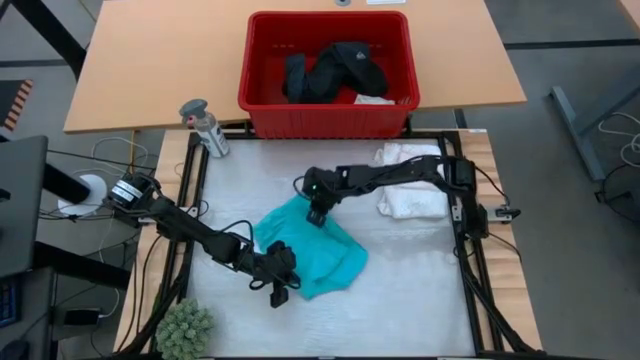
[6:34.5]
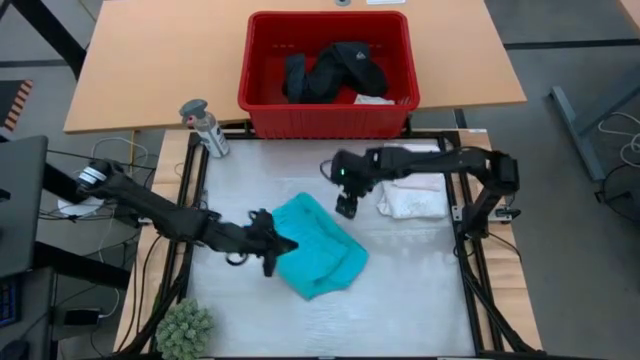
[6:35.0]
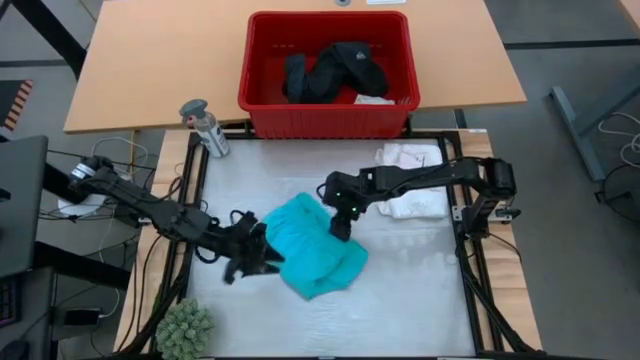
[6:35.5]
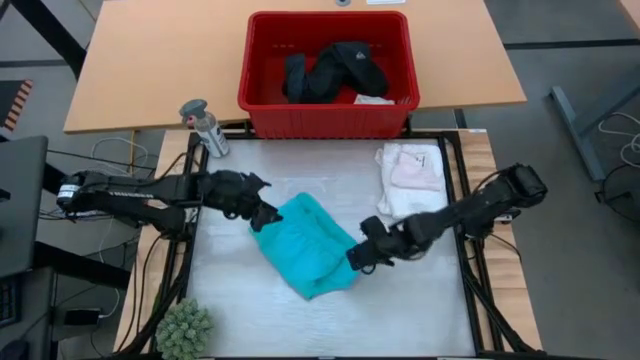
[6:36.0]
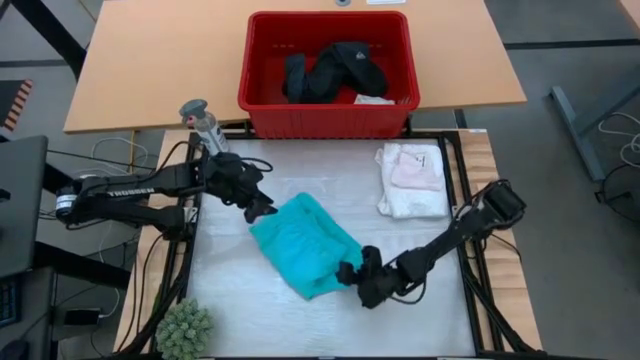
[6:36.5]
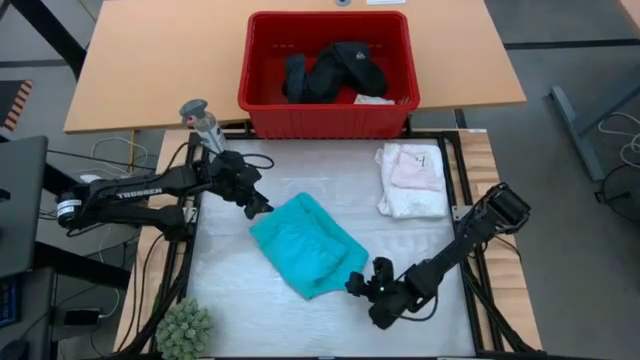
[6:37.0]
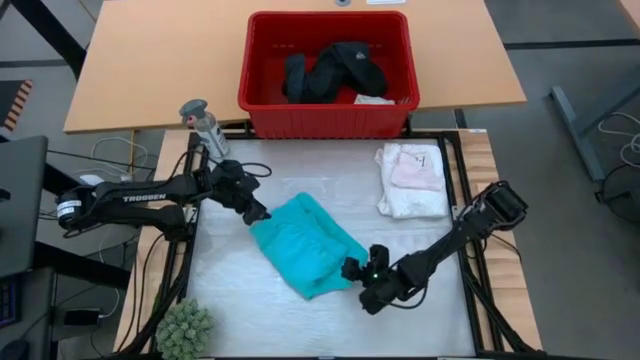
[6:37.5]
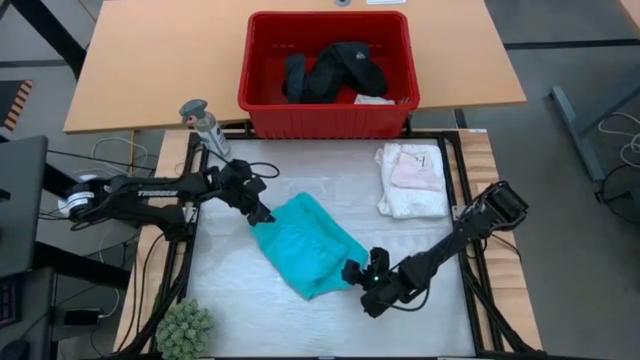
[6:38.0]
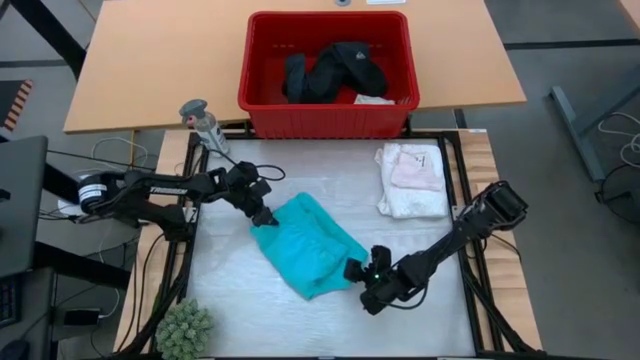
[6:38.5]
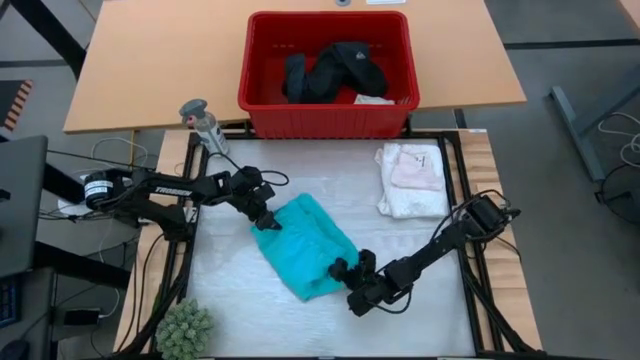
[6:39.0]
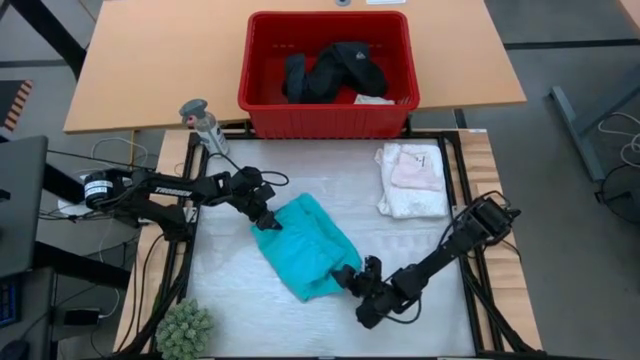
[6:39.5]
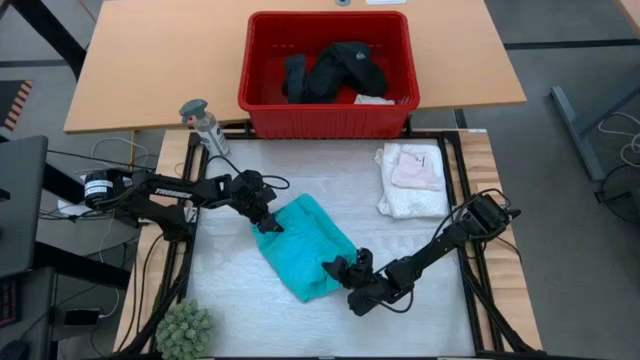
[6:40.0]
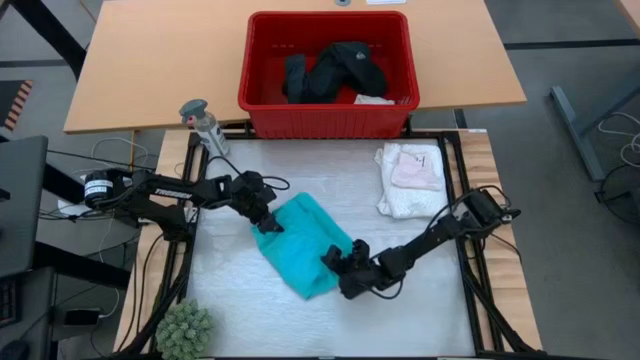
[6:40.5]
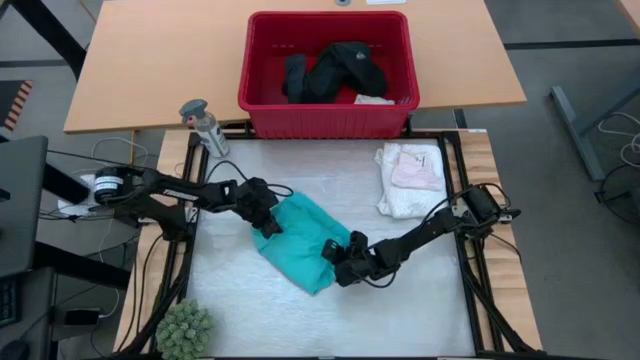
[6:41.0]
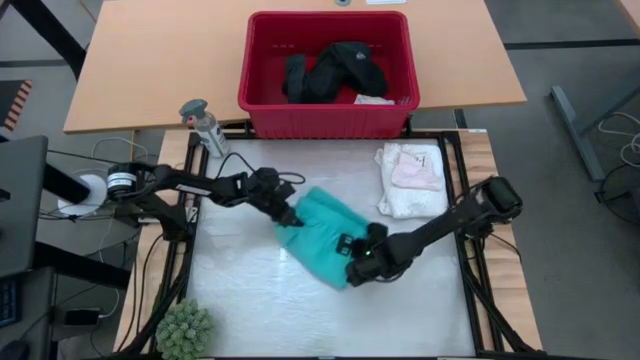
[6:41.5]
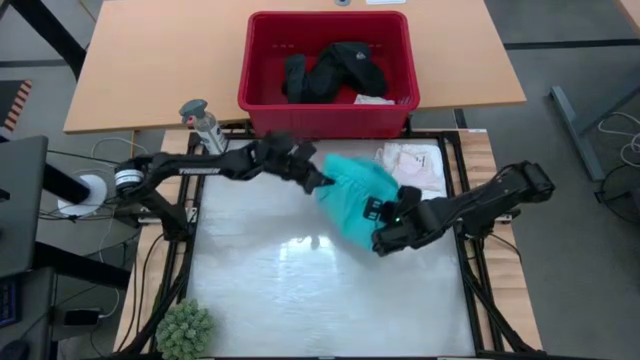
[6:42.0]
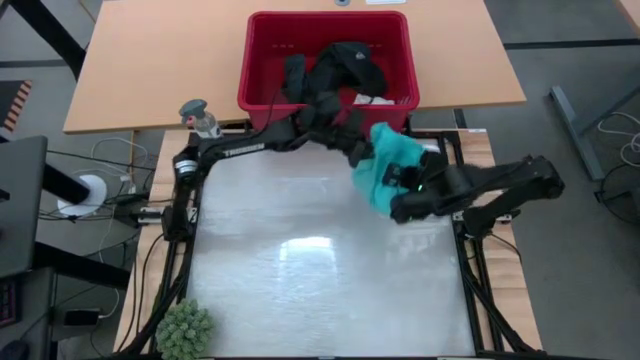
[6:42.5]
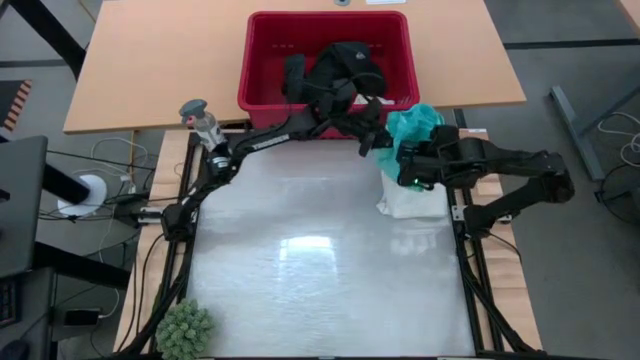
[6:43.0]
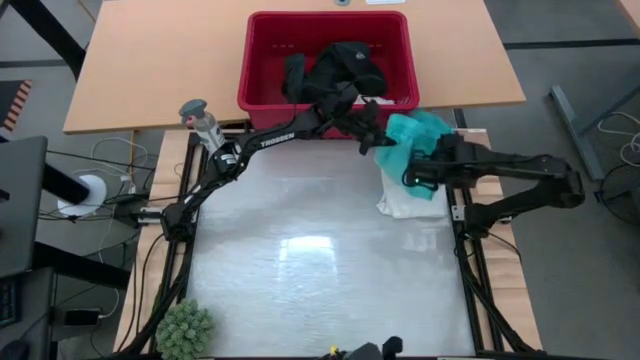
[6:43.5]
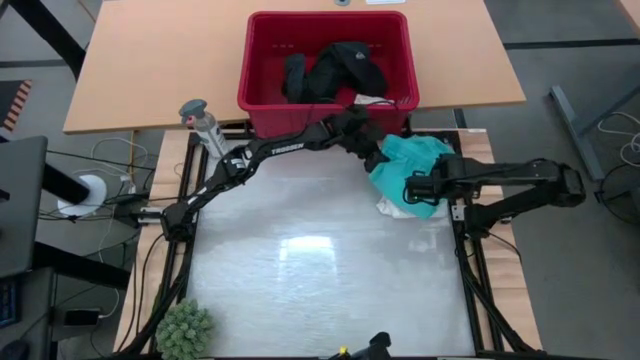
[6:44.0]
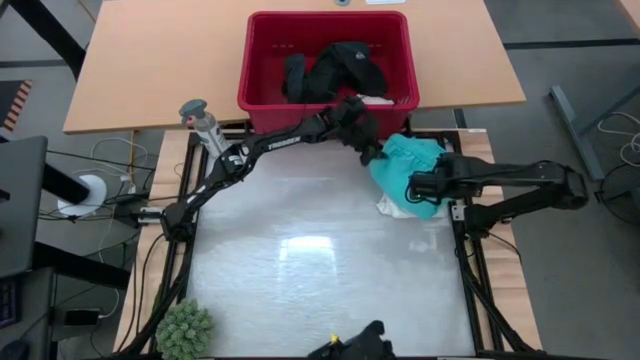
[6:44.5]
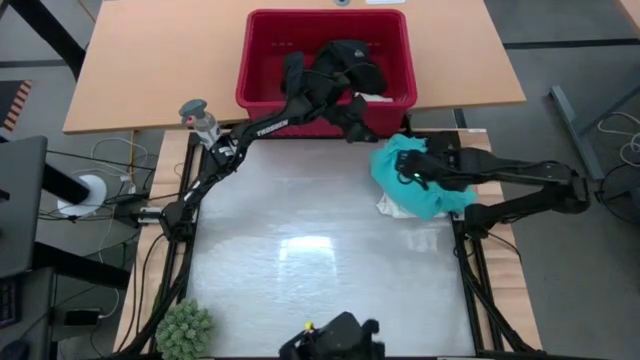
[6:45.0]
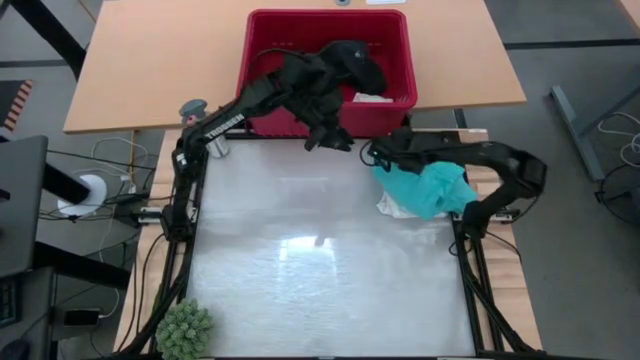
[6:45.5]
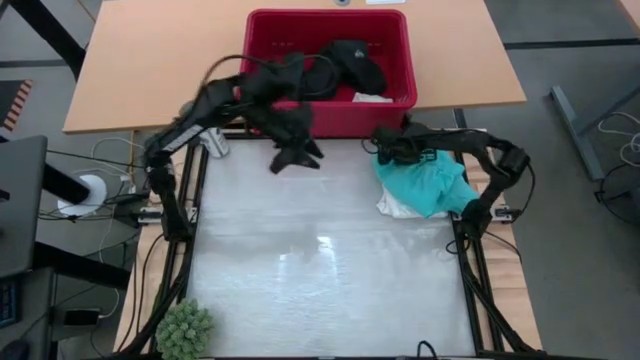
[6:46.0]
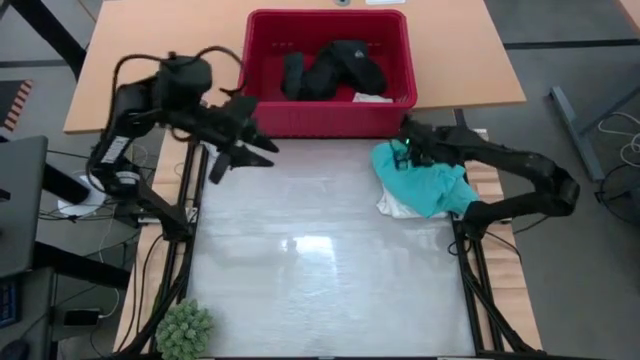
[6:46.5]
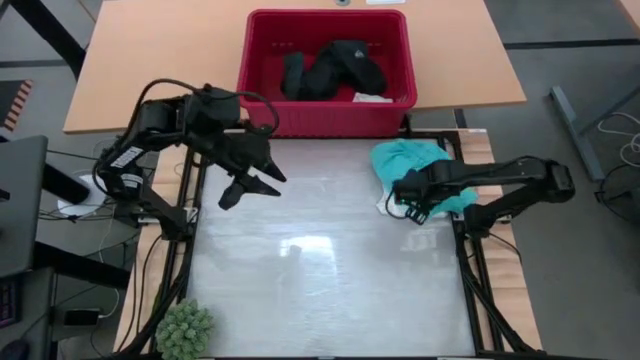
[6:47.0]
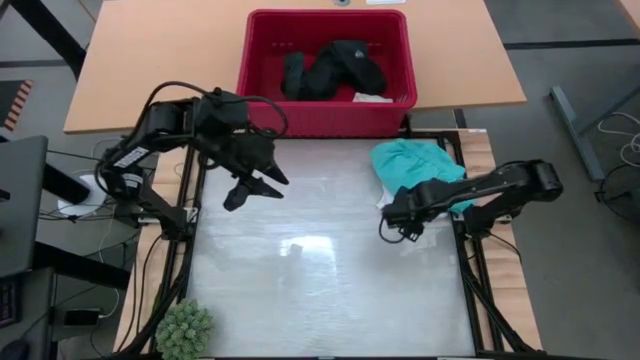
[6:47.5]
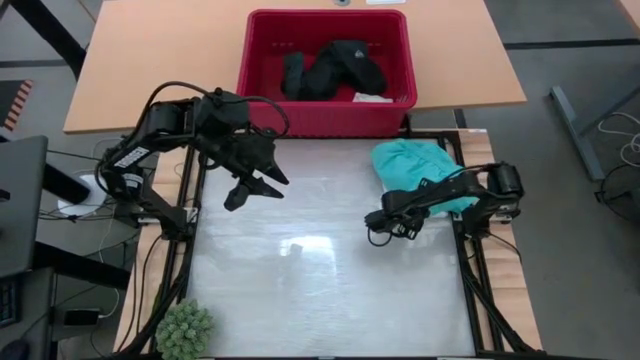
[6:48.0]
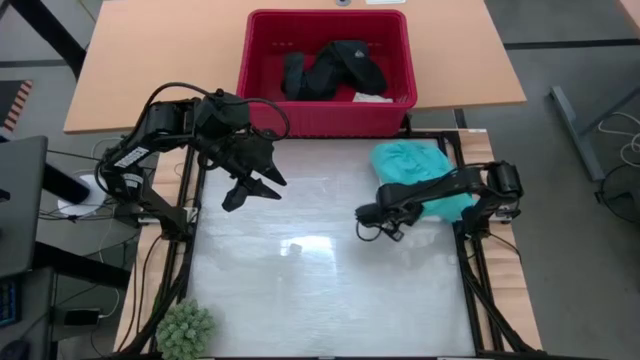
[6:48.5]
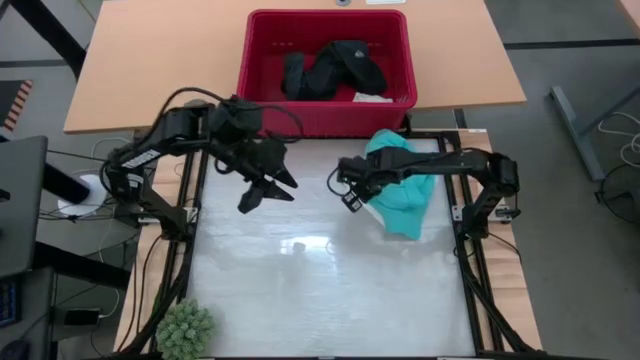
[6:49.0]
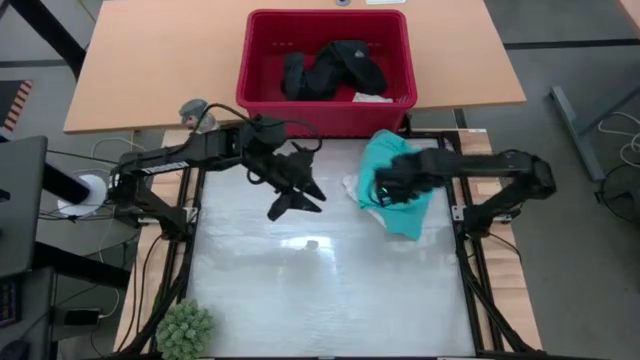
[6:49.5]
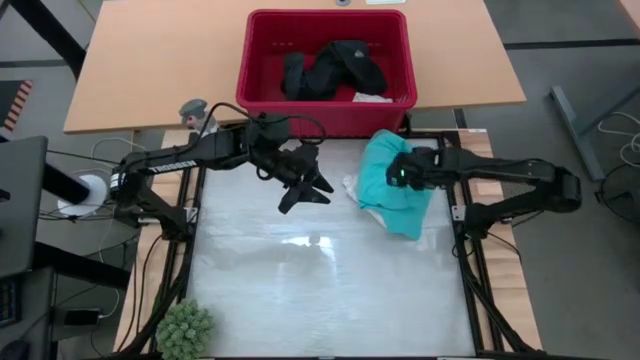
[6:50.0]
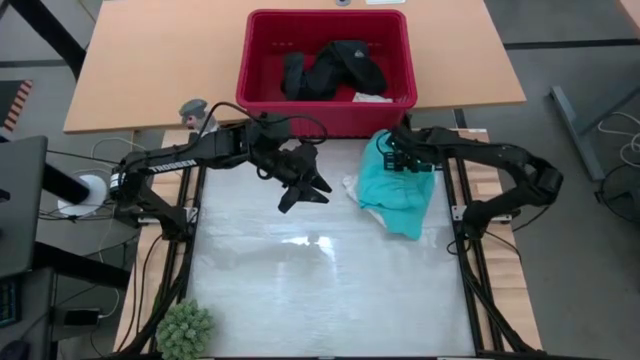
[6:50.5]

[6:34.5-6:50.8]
Task: Fold Laundry from Bin
Stack the light blue shorts on top of the white underwear
